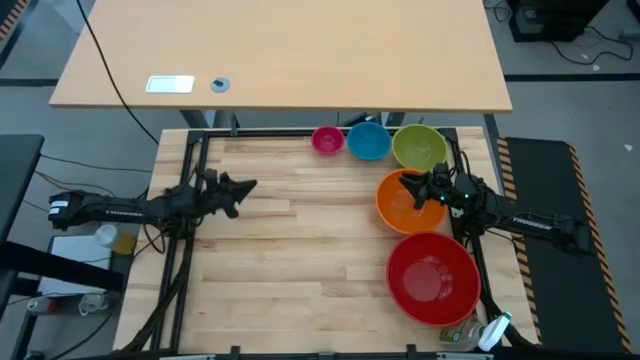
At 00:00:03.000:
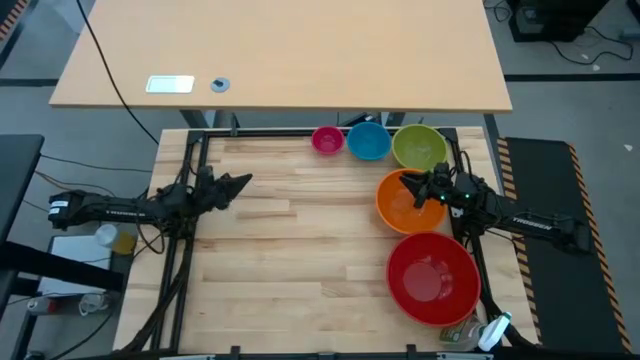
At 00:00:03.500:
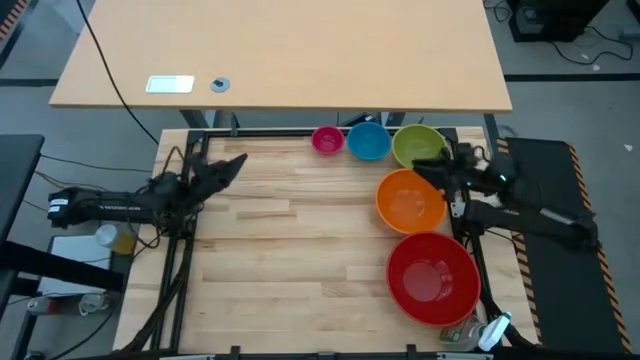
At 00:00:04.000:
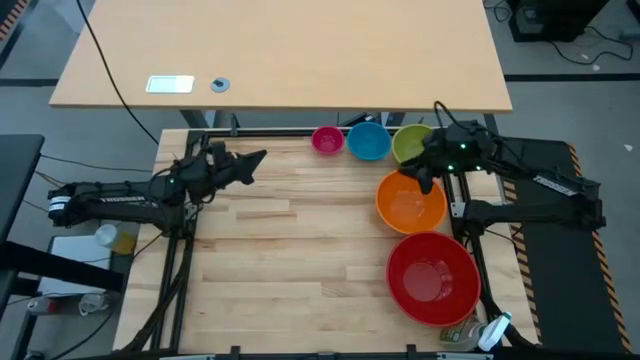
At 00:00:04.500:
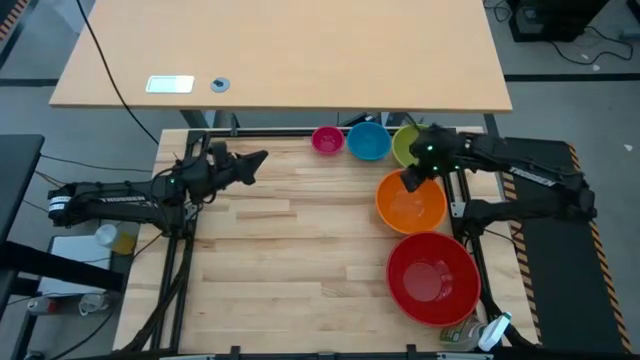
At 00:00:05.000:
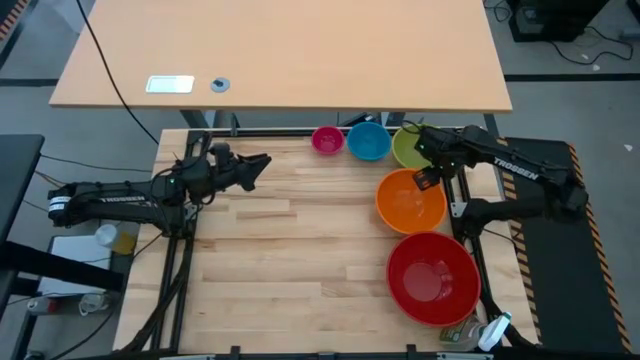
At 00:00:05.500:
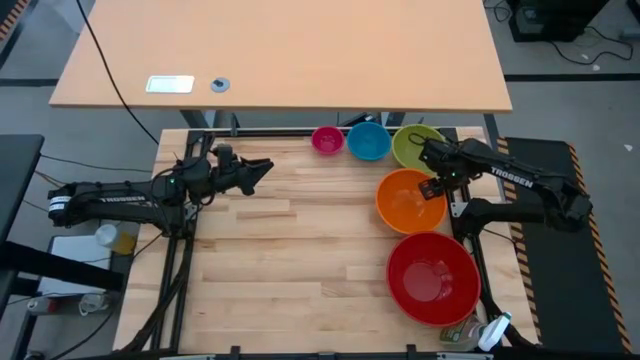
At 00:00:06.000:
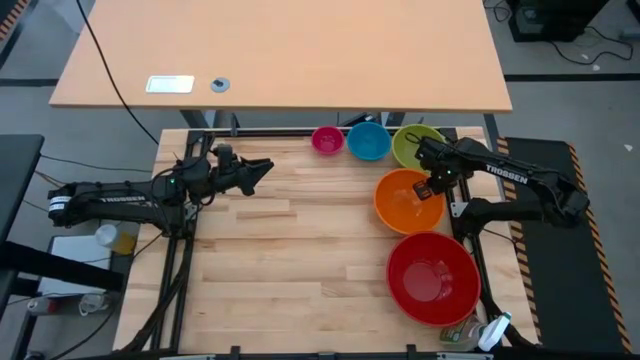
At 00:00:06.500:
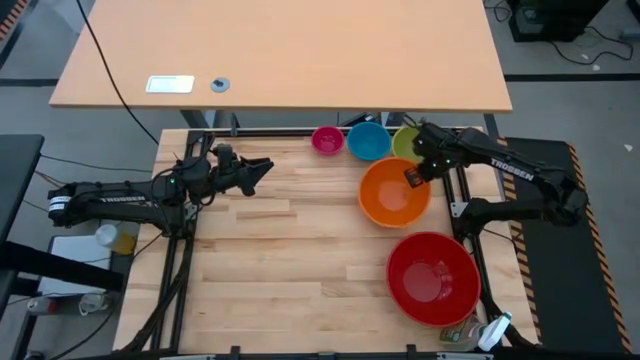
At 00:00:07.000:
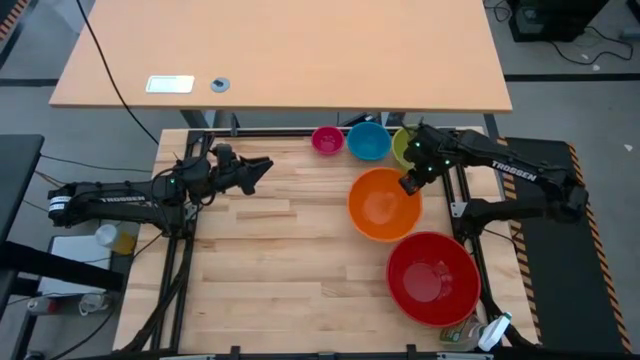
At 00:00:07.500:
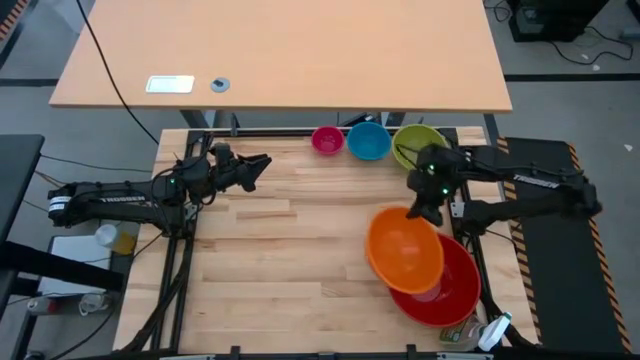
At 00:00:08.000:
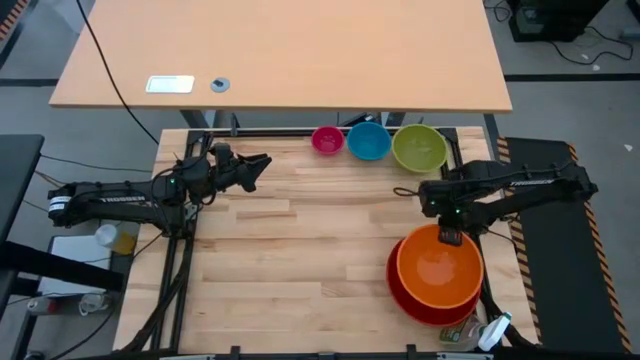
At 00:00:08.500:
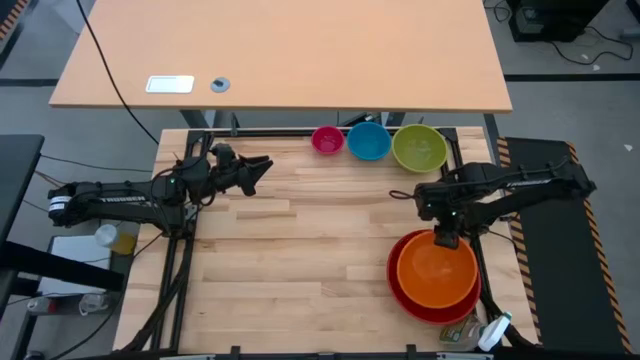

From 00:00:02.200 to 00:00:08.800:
Stack the orange bowl into the red bowl

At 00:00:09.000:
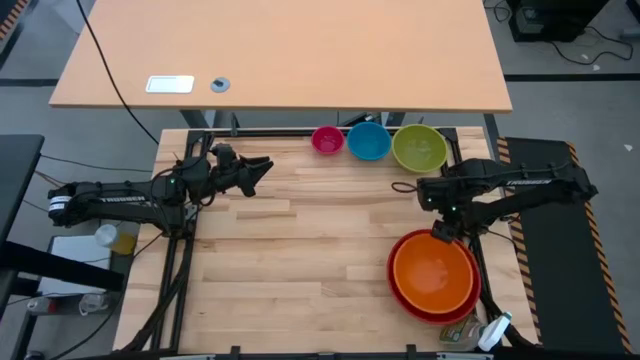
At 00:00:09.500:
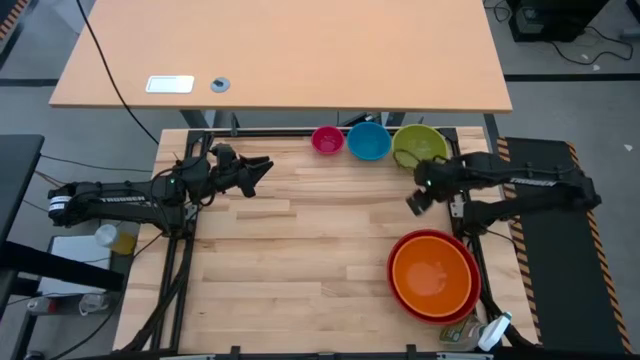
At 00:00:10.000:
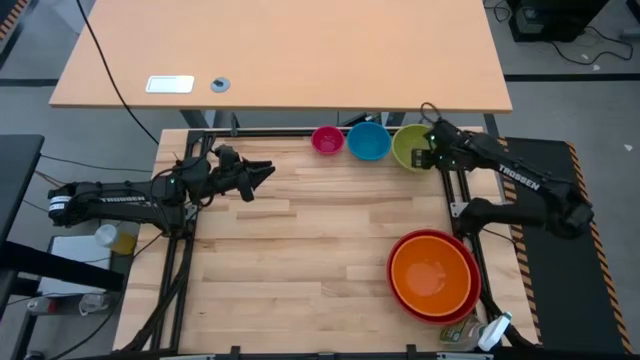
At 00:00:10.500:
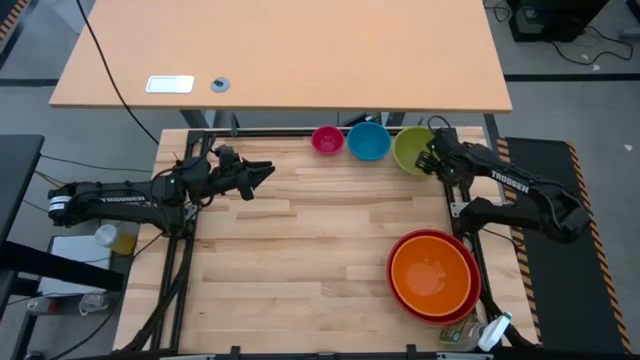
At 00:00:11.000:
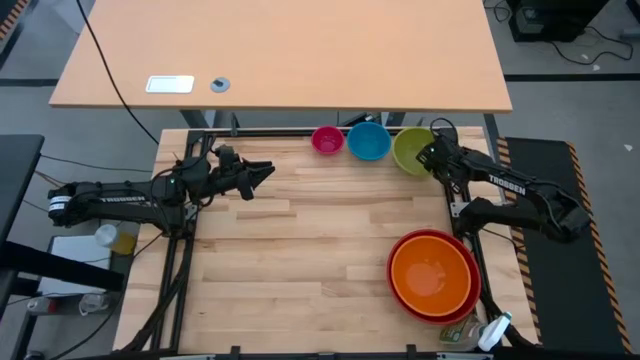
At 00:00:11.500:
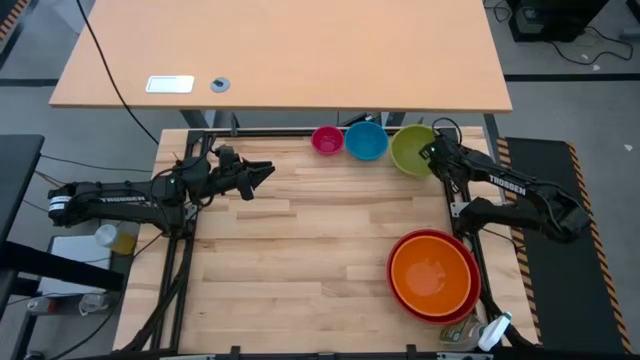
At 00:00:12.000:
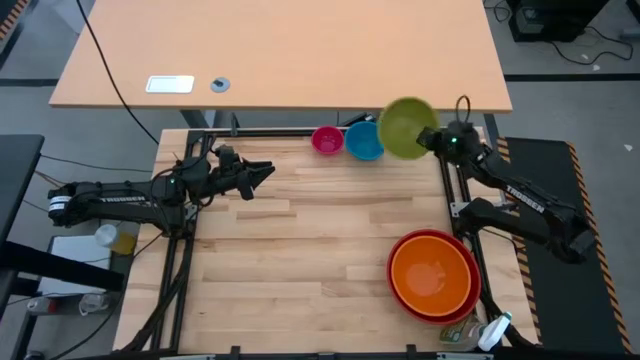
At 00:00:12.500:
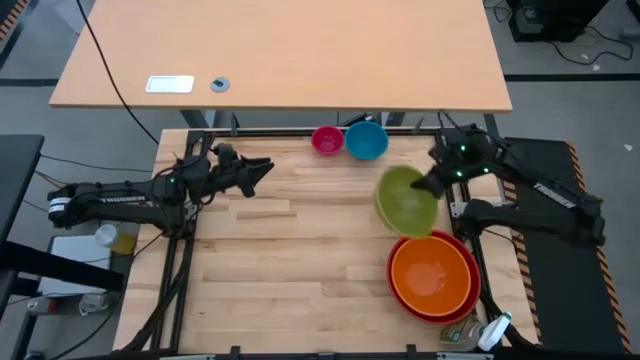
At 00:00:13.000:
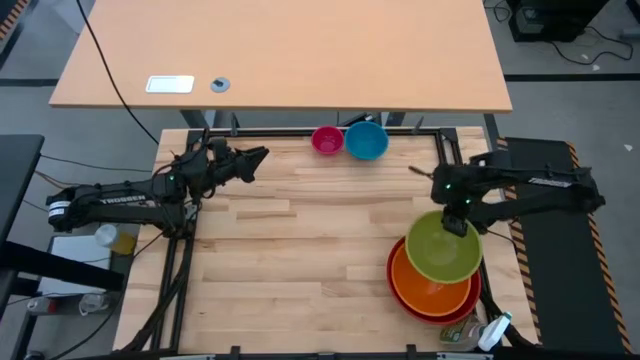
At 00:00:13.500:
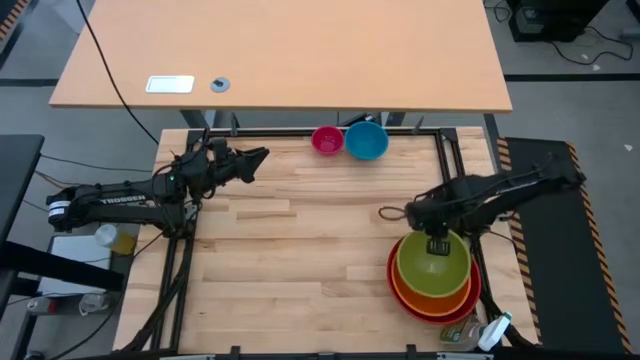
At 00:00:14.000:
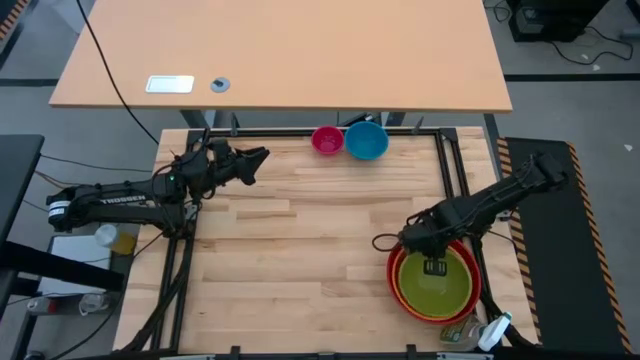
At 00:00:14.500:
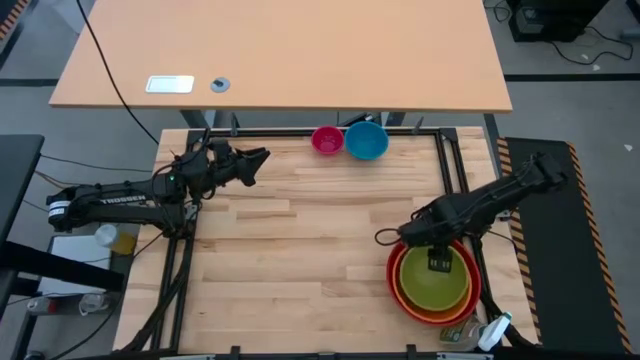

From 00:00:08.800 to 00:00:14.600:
Stack the green bowl into the orange bowl

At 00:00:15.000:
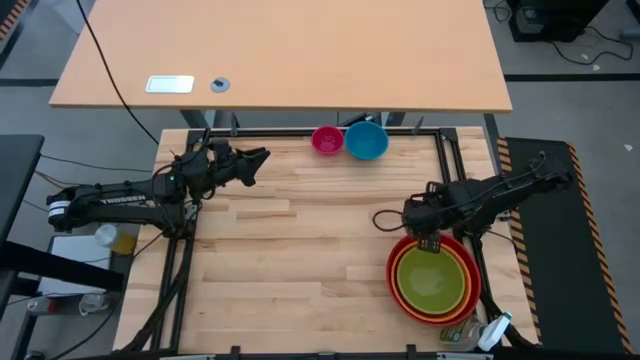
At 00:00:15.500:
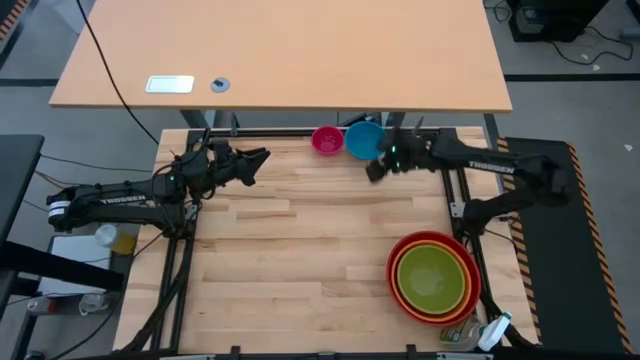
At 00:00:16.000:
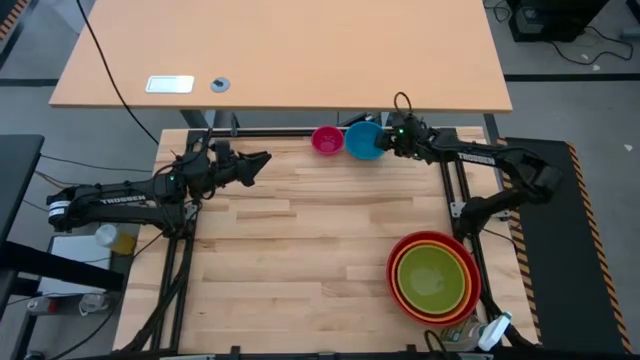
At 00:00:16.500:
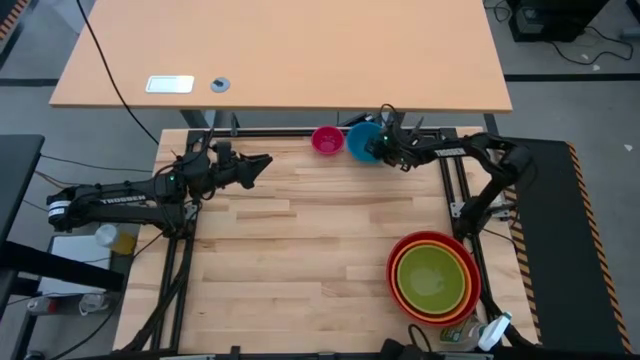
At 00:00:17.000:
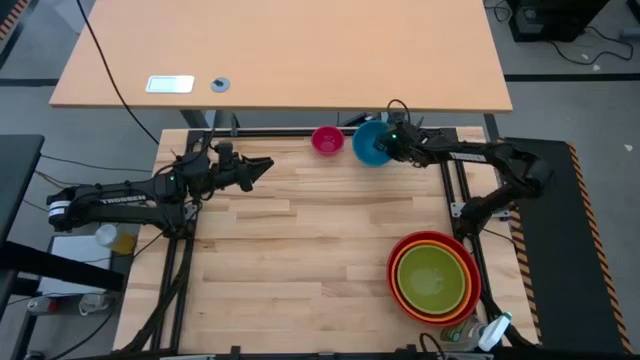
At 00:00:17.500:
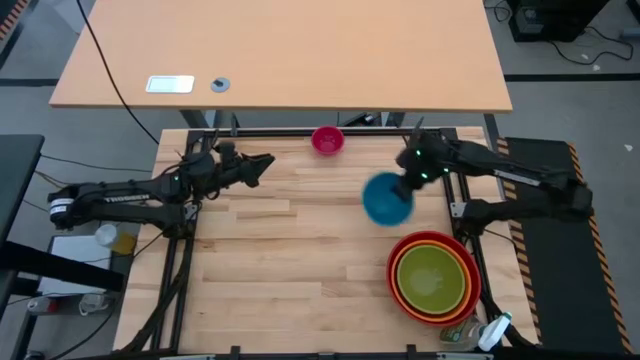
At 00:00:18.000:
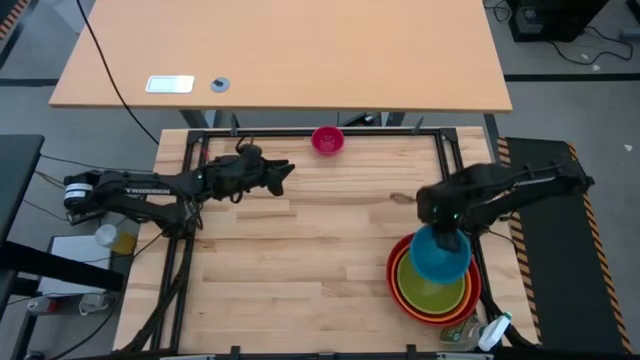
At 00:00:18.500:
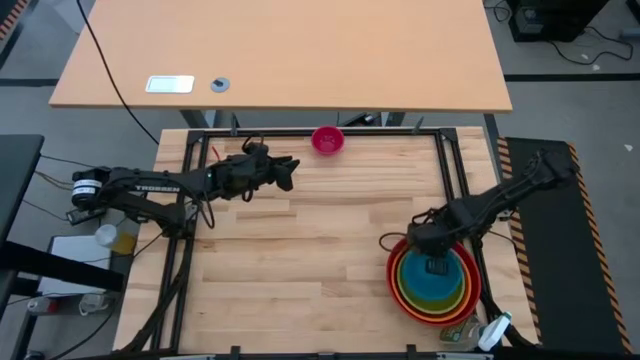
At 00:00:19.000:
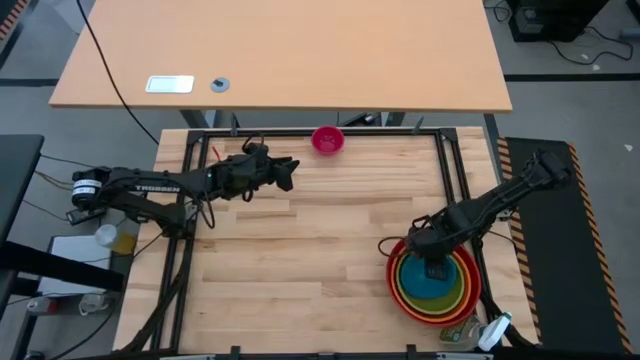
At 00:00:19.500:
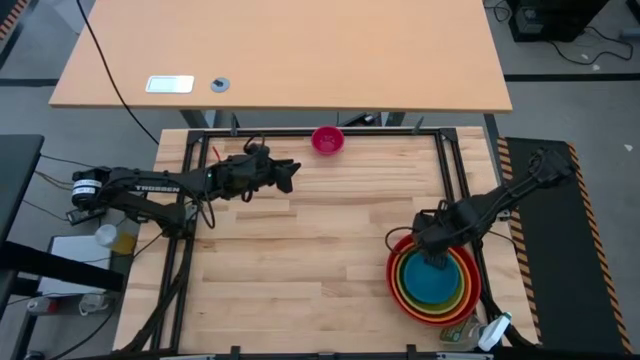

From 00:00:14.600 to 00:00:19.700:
Stack the blue bowl into the green bowl
